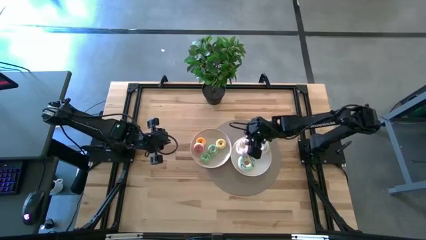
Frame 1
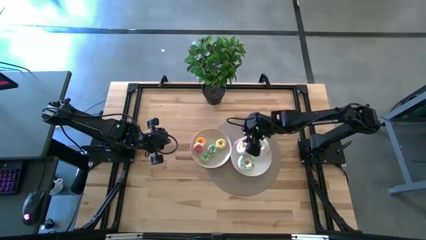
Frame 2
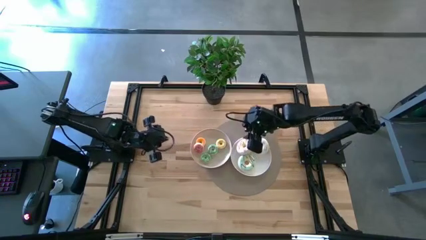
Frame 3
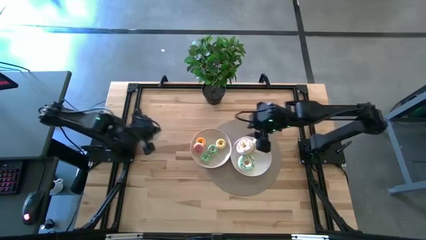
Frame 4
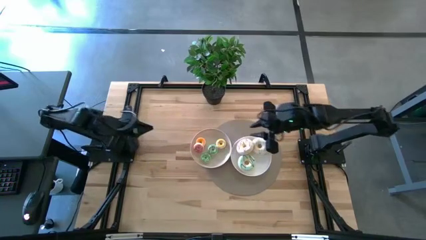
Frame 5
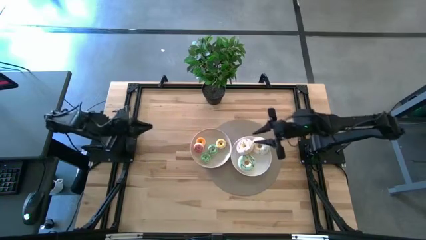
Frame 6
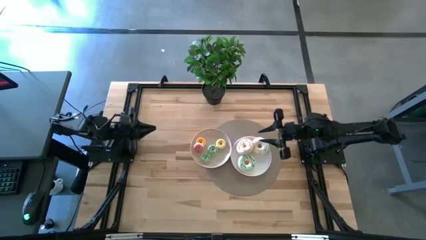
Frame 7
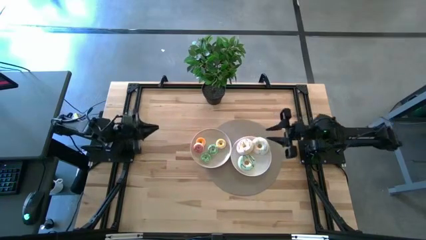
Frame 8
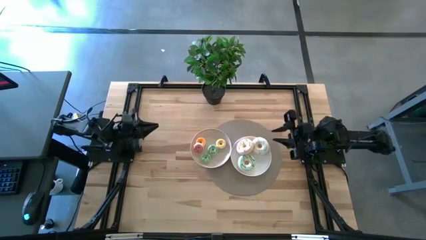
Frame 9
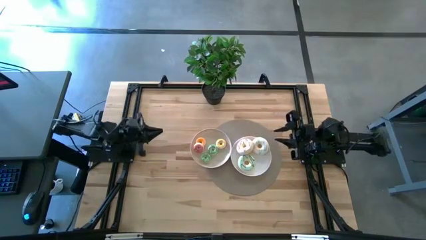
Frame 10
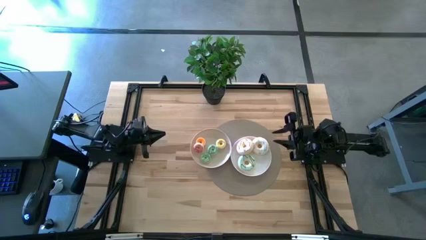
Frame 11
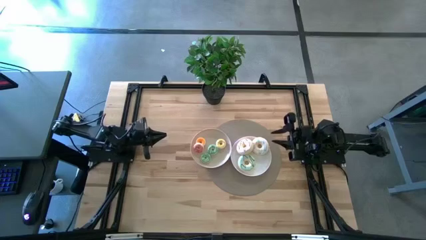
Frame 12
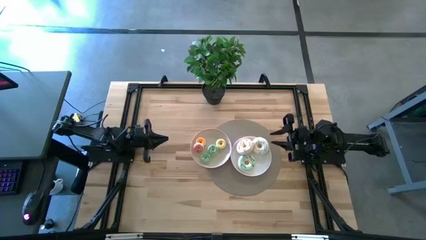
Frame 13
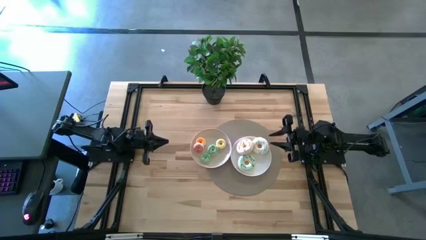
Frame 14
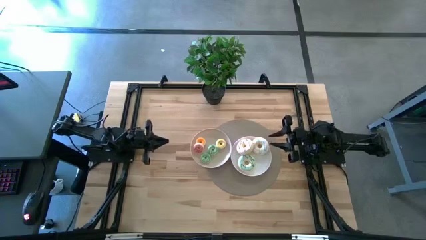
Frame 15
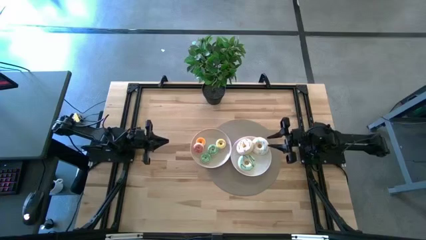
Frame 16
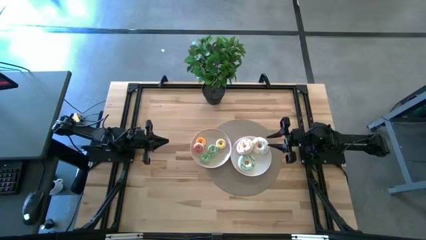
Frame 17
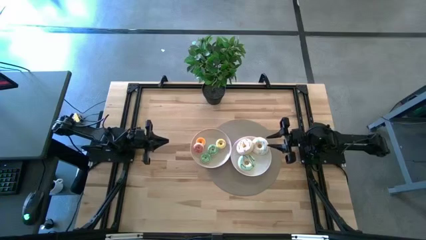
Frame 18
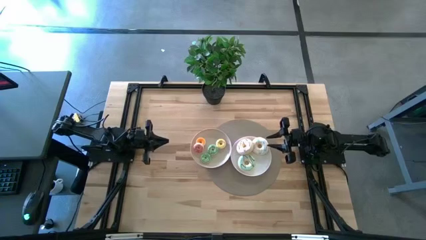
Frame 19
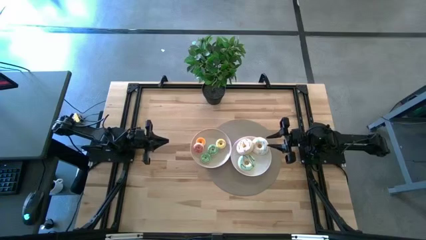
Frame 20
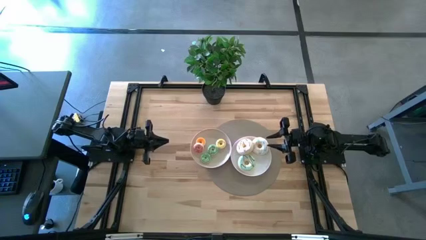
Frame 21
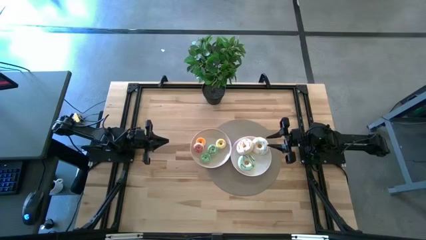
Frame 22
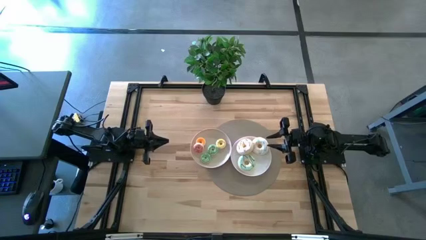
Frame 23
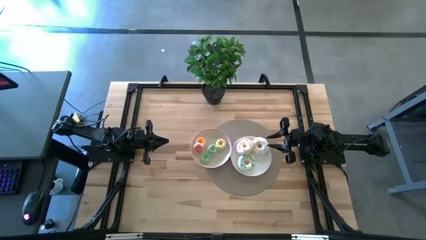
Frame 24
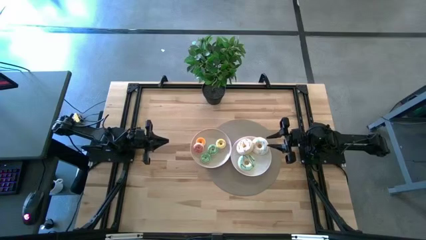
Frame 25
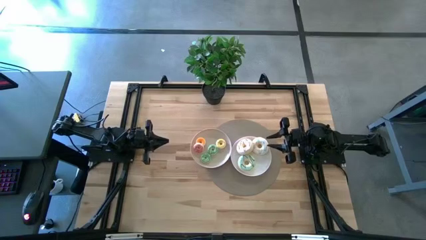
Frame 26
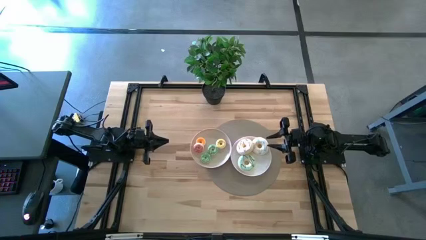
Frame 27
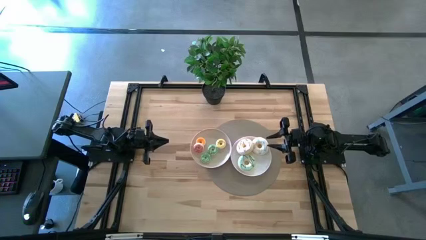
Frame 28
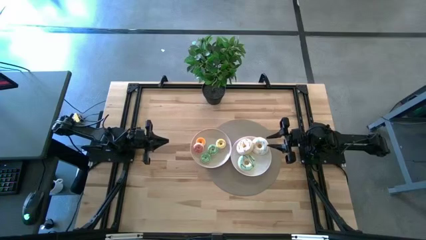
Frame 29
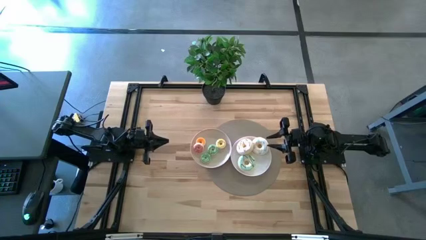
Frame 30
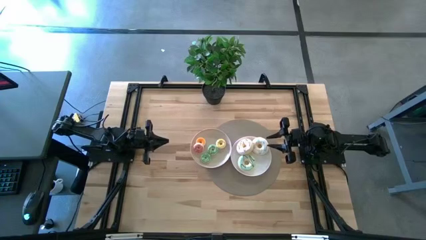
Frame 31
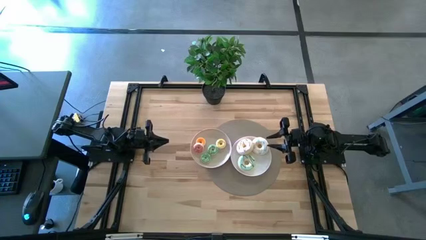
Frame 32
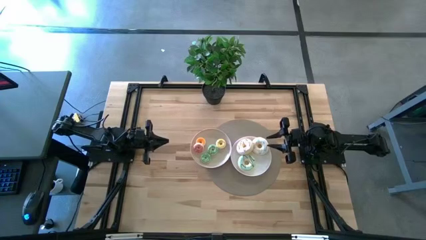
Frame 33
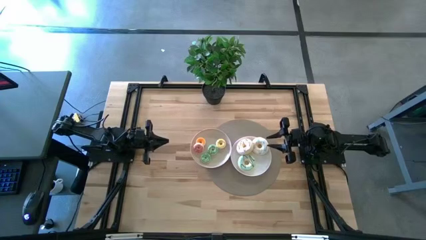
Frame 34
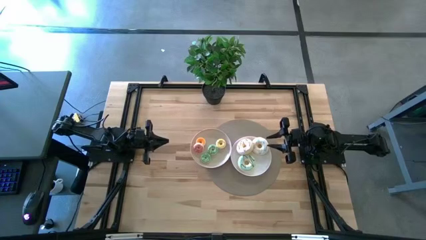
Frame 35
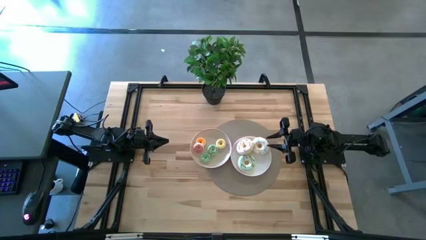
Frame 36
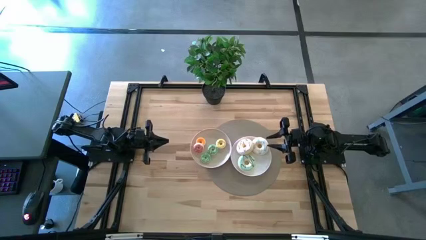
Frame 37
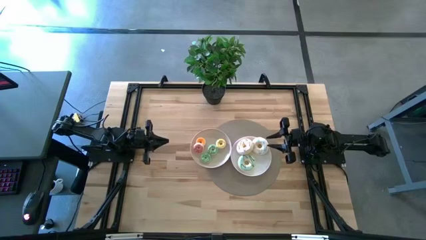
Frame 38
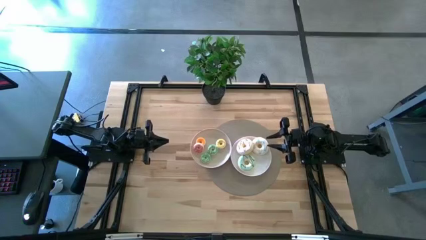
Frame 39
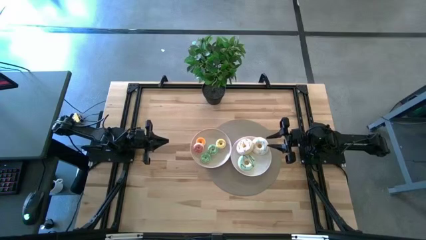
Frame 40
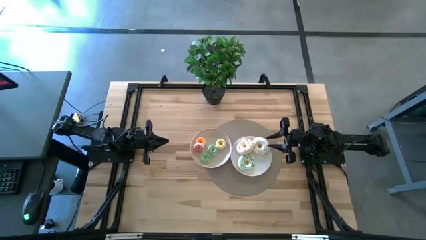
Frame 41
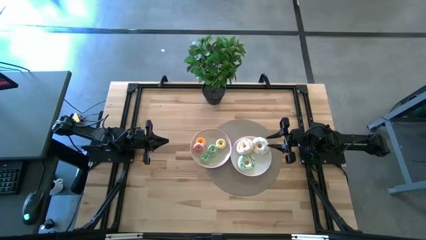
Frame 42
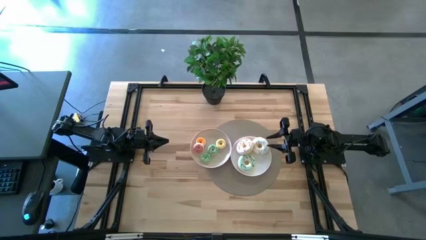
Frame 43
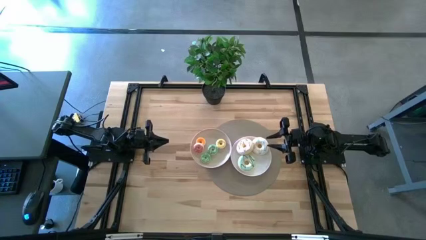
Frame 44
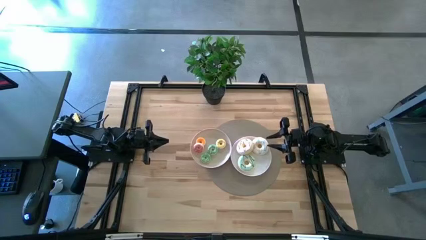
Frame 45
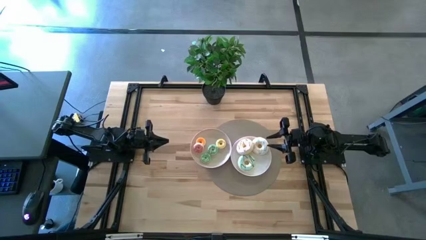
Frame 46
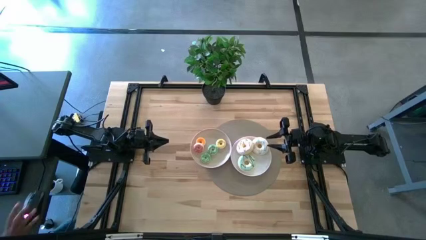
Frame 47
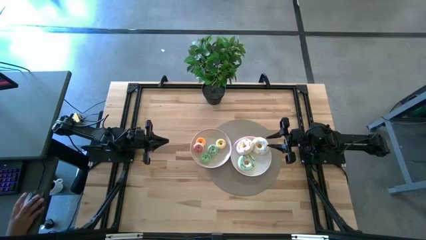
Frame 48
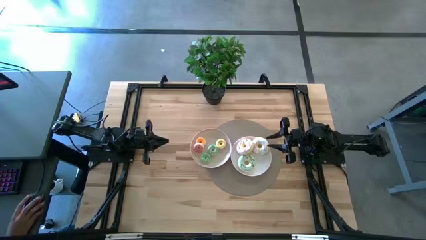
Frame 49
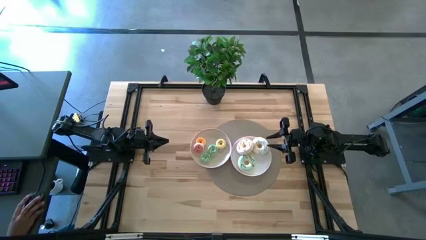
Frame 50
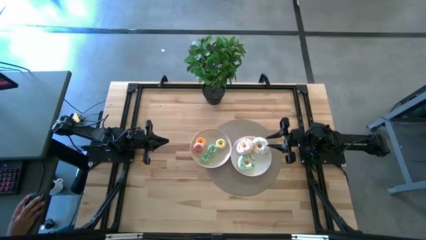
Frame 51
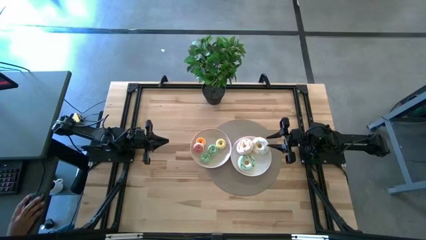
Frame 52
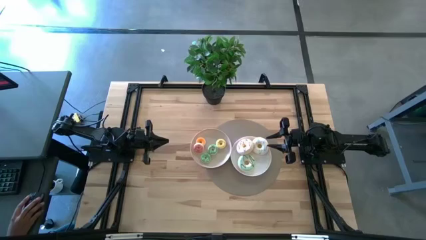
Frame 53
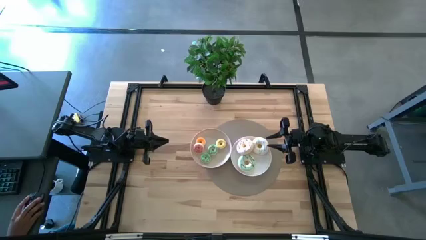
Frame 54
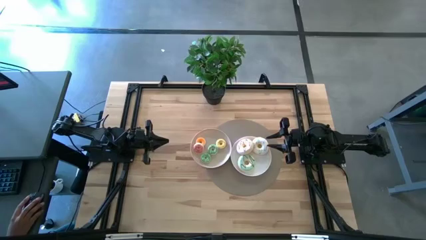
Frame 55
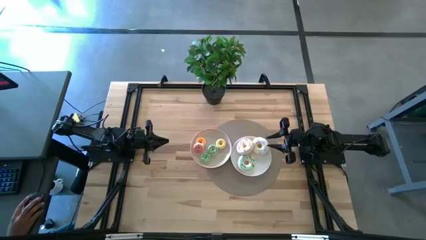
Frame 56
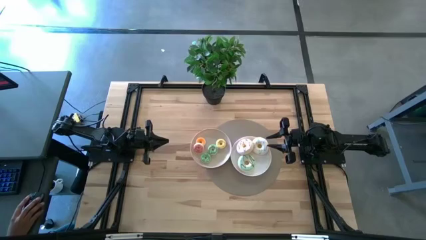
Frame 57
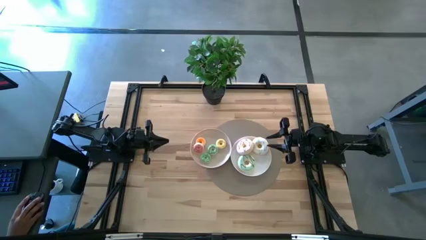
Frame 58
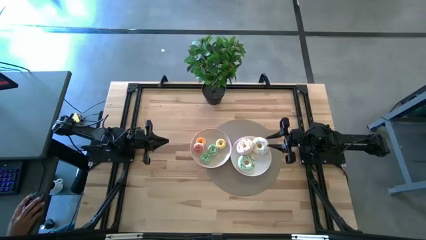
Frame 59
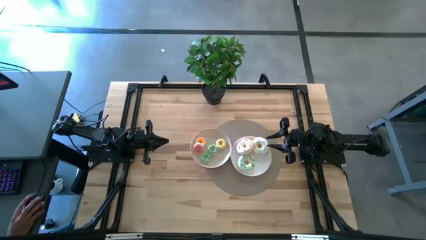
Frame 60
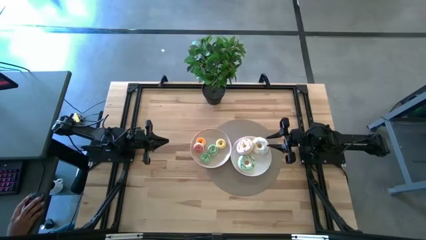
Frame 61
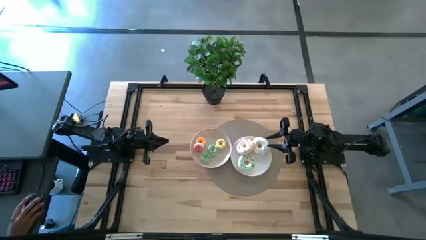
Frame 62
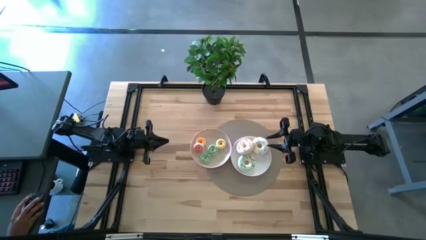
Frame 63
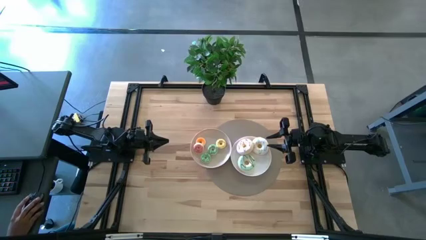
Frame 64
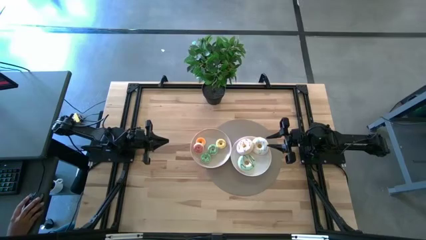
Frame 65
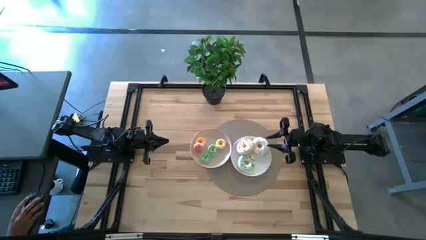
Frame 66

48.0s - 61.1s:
Task: Pick & Place donuts
Return to Home Position

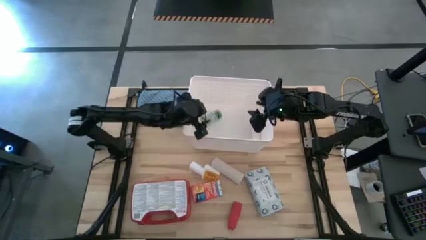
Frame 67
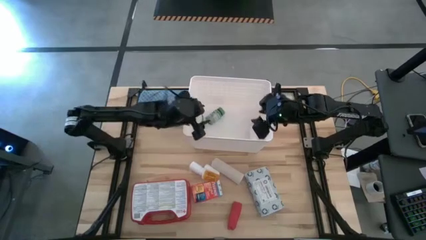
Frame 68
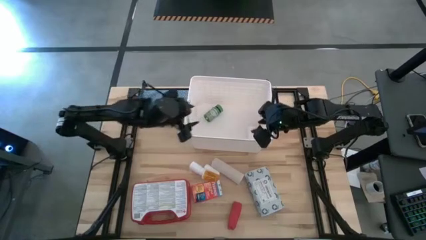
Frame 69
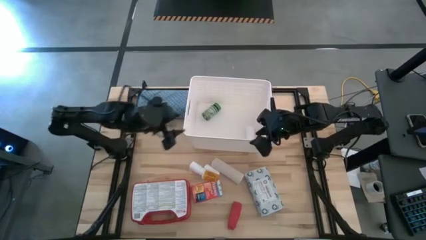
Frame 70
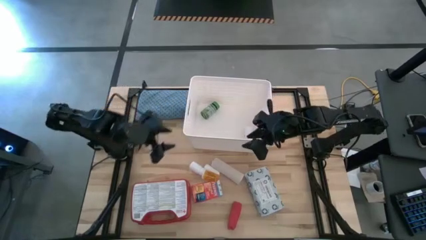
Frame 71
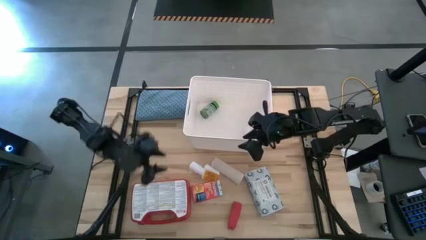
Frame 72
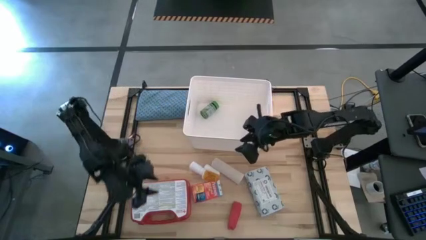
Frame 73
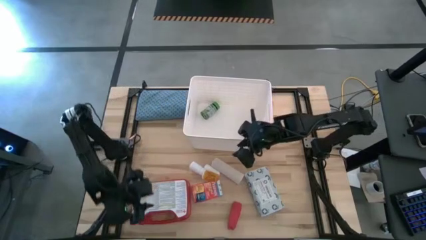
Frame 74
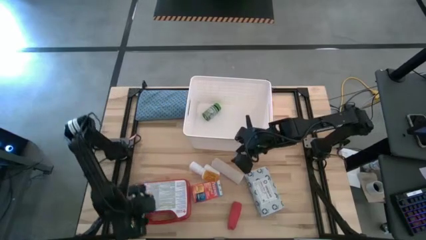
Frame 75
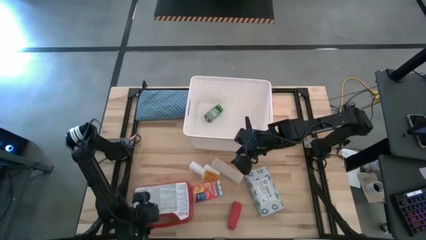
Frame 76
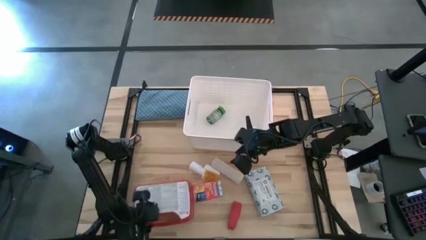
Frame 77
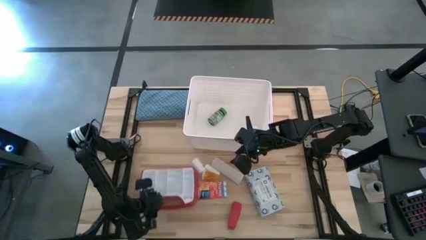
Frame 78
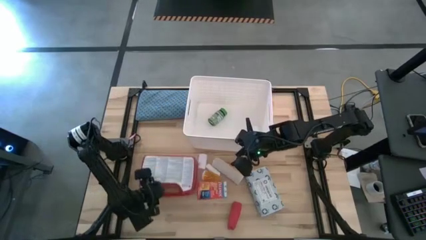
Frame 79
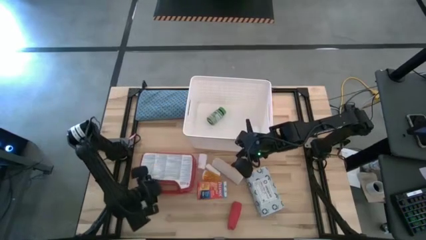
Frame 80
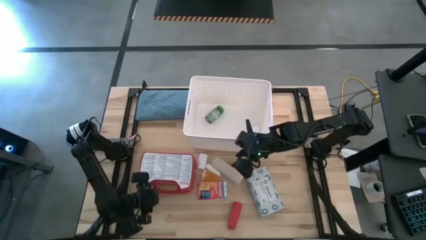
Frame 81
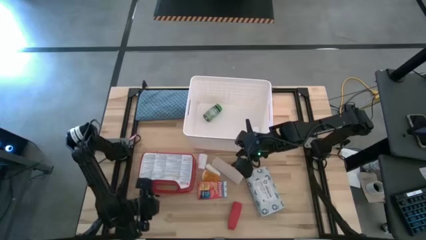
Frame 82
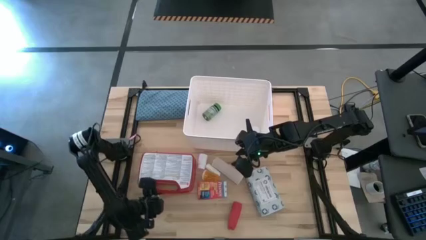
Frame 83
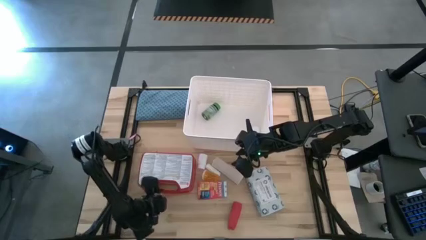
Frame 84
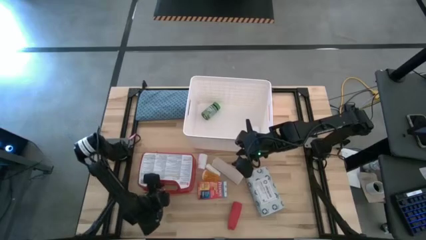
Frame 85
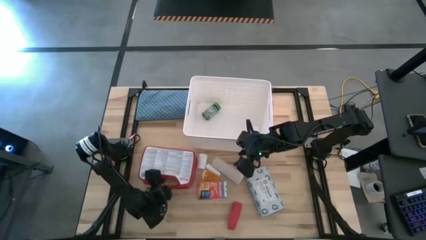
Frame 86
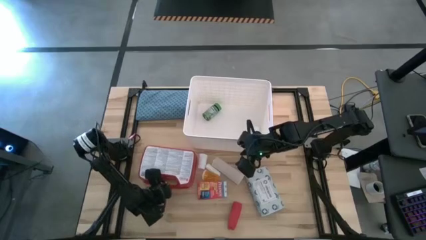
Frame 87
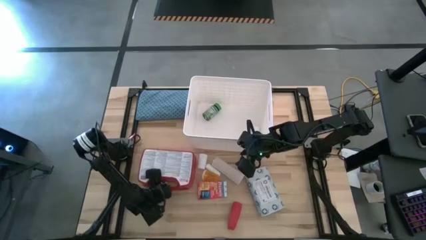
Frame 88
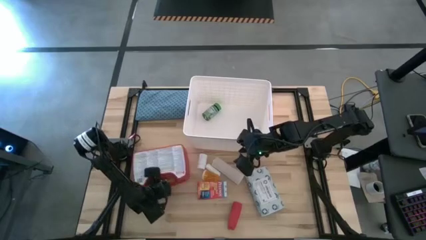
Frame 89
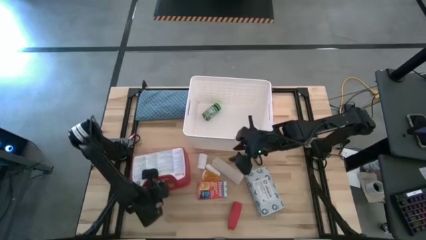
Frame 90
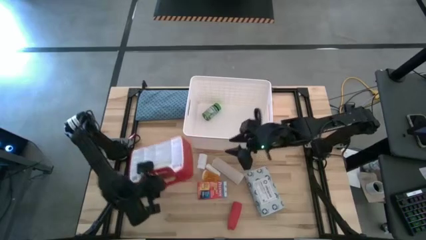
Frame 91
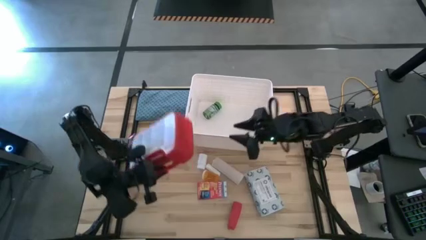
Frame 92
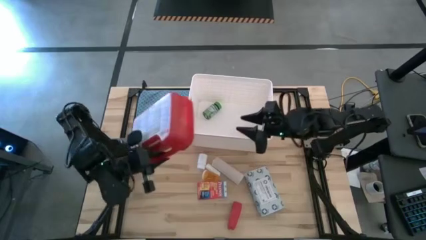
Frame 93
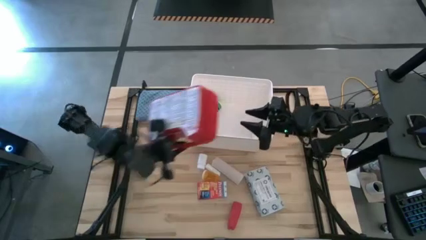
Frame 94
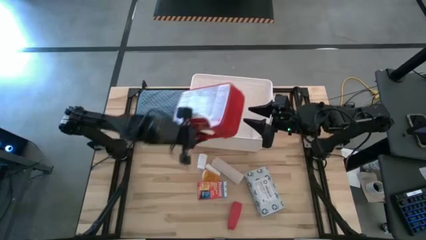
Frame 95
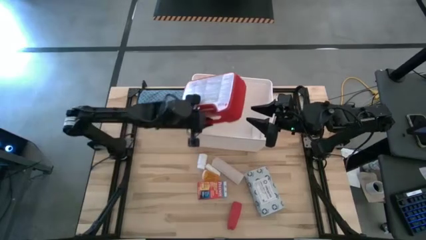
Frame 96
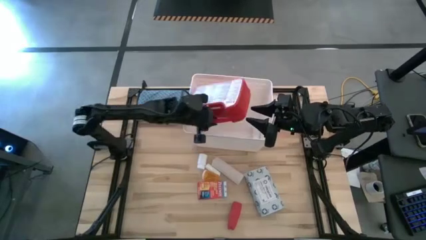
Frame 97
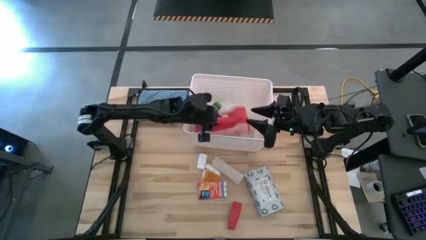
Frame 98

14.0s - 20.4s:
Task: Pick & place medical supplies in basket/bin
Put the red first aid kit into the white bin
